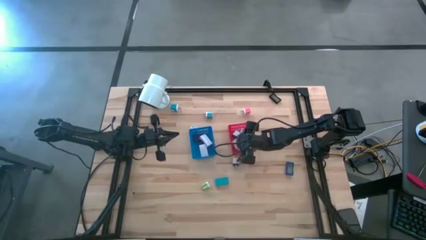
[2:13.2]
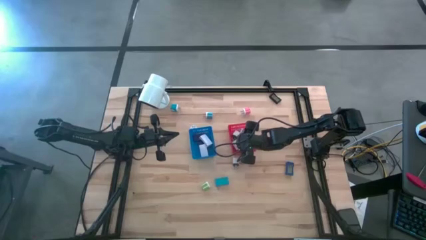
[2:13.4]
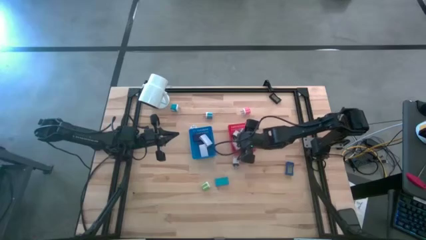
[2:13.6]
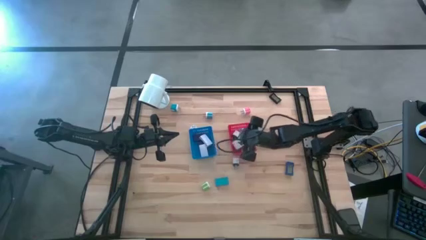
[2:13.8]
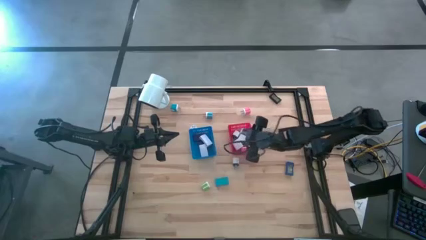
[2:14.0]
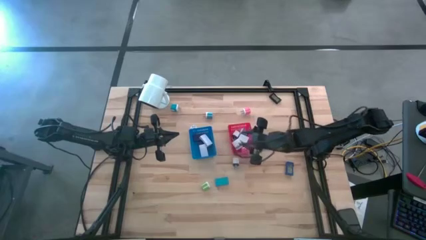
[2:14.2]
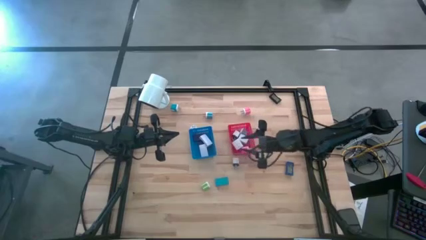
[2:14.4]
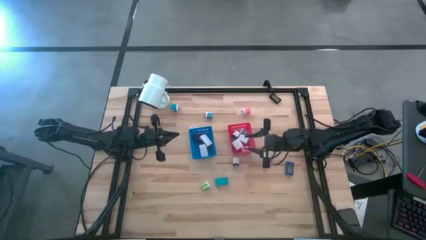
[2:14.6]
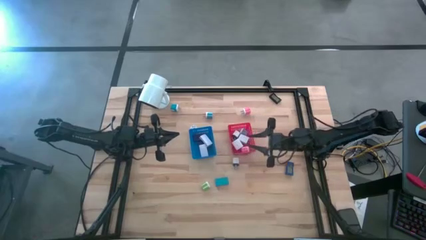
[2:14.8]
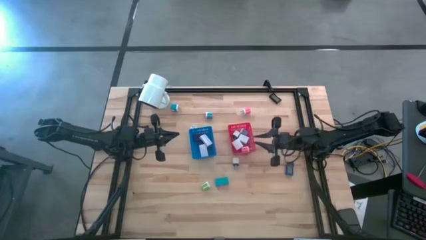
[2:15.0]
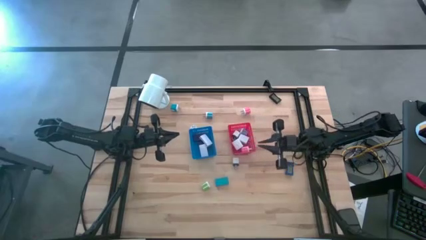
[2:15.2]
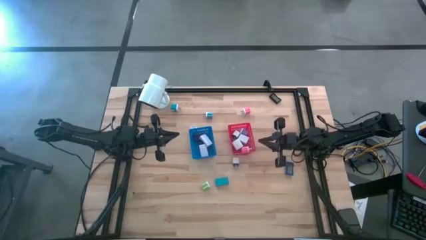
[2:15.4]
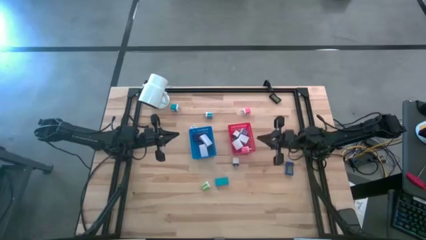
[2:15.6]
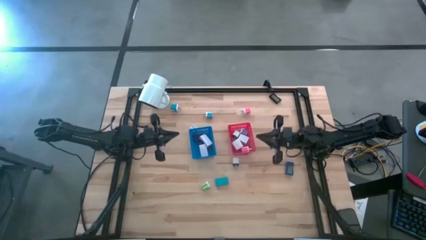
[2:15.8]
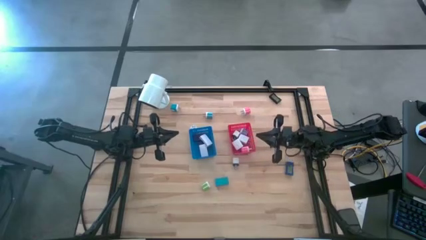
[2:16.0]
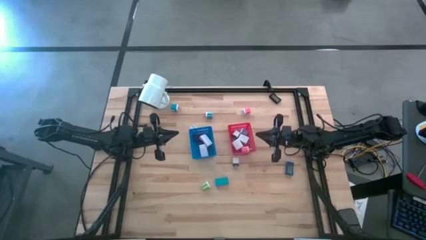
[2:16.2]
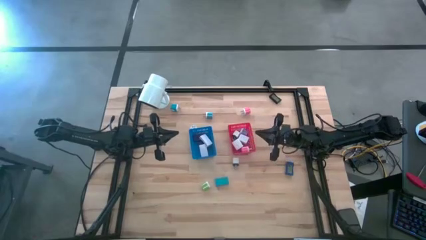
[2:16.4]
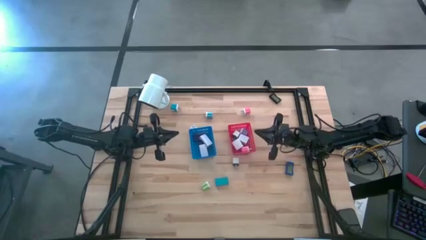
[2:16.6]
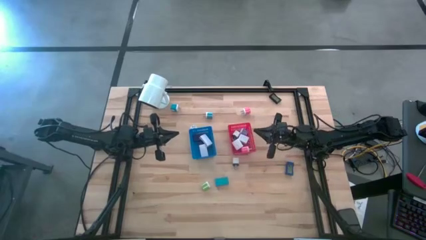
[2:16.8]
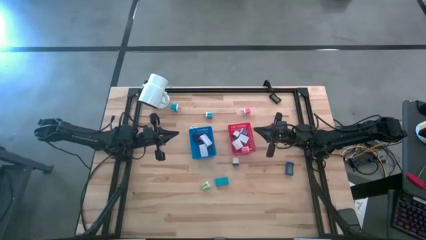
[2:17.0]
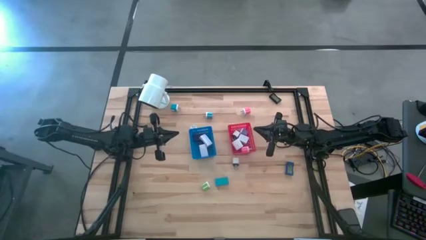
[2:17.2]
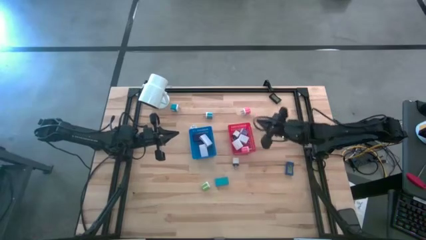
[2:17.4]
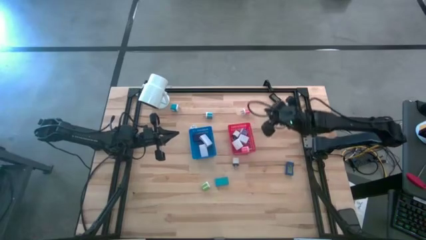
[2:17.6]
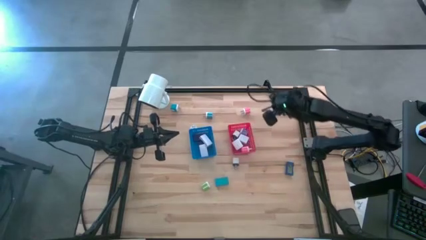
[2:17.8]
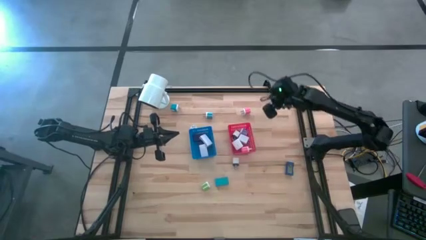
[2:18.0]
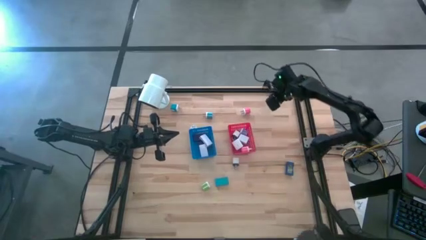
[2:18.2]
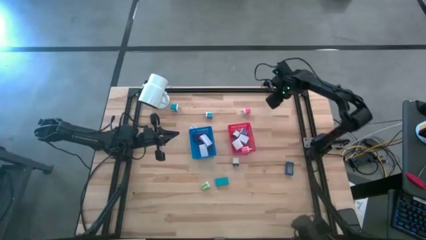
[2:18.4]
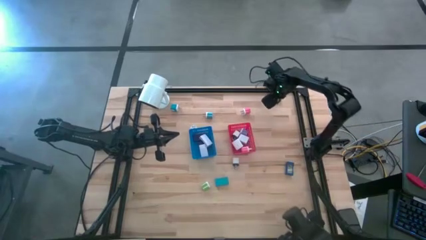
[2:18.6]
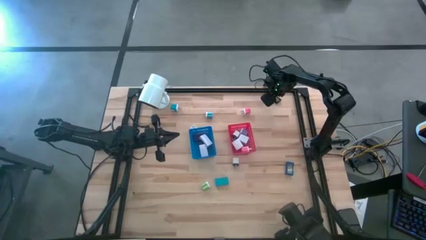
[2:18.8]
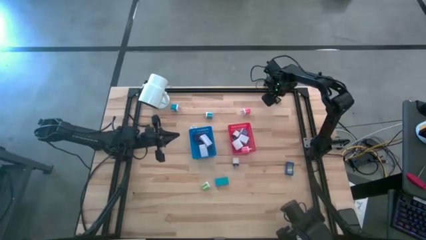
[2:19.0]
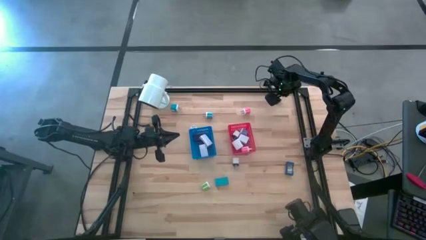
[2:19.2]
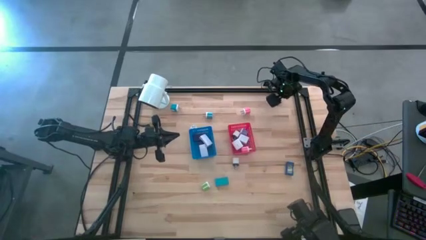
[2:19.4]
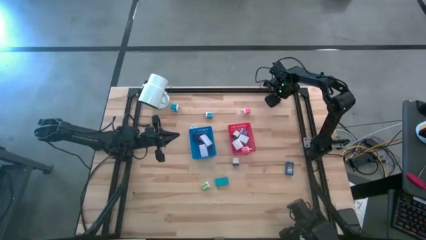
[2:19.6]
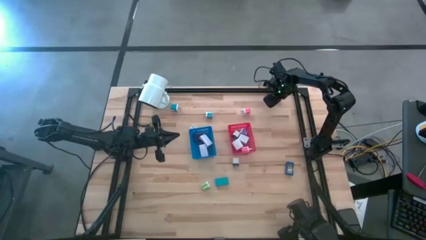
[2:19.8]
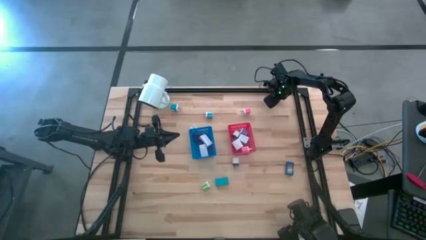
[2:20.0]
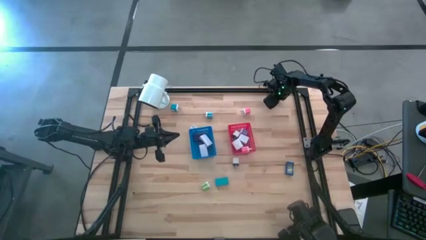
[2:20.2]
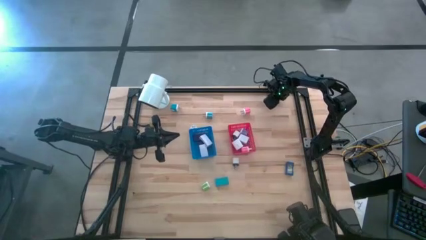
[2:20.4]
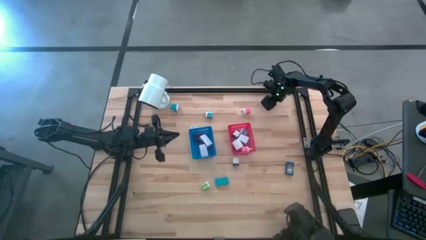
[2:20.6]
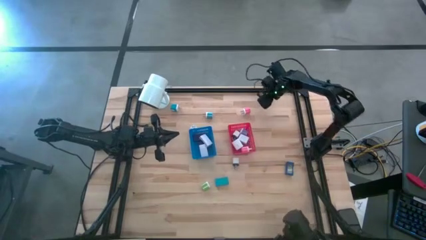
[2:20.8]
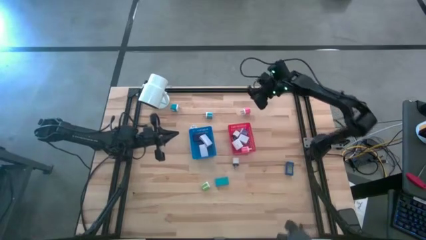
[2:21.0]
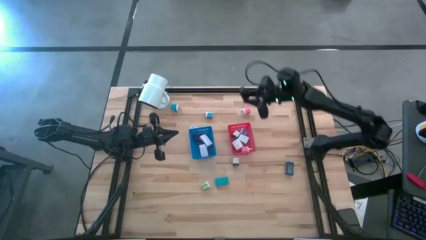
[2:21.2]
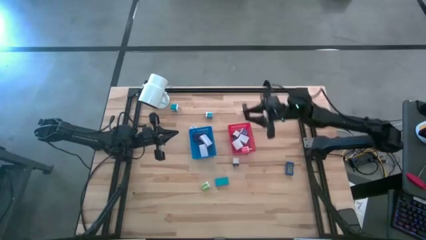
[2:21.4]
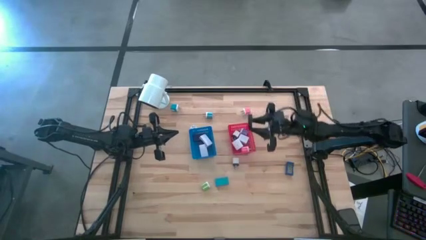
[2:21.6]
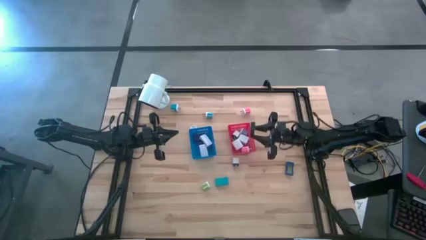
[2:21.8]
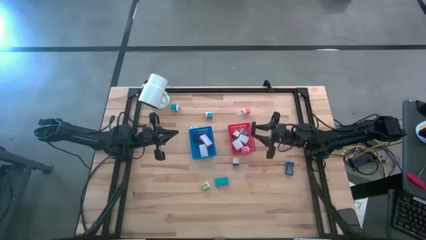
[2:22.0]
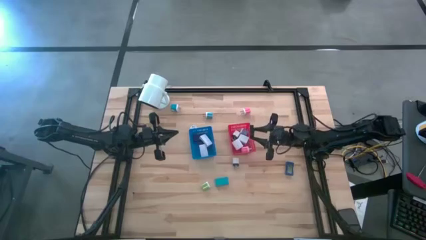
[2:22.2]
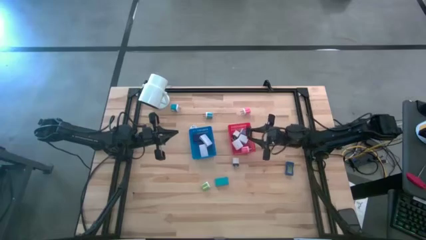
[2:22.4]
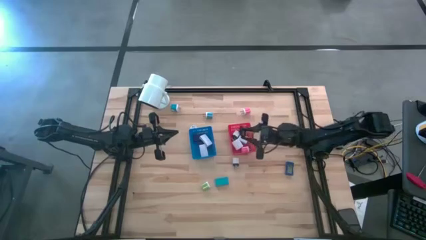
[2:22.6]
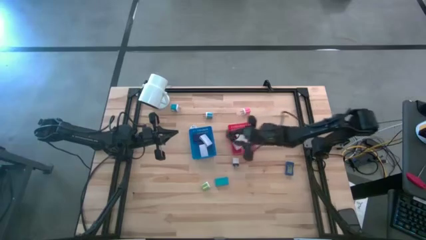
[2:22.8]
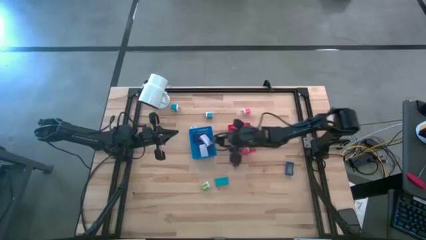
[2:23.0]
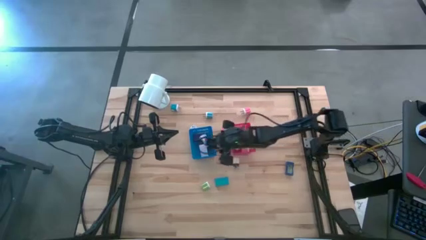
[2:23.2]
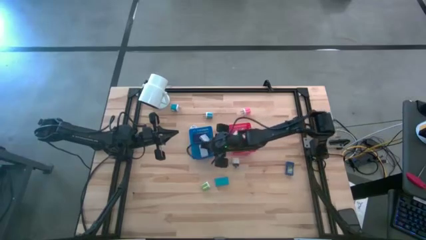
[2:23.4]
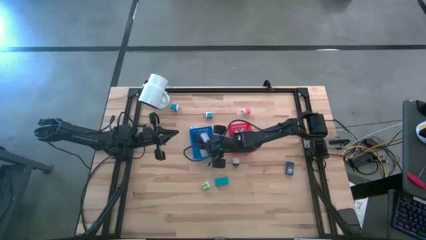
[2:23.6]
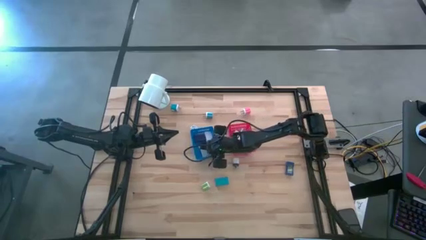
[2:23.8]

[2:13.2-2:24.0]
Task: Pick & Place Office items
Put the black digital clock into the blue bin
